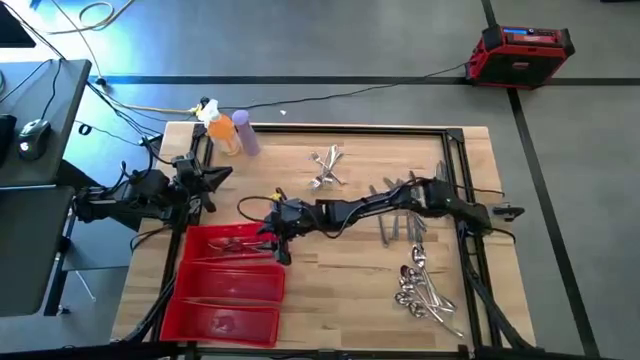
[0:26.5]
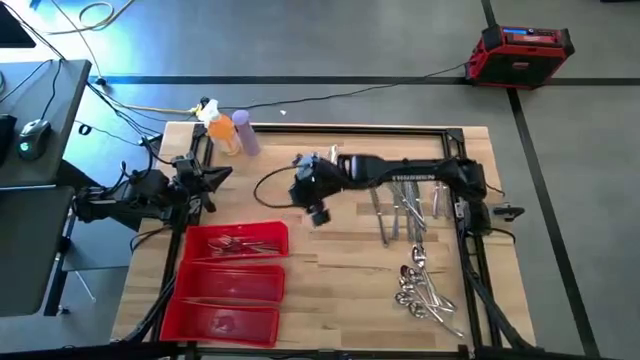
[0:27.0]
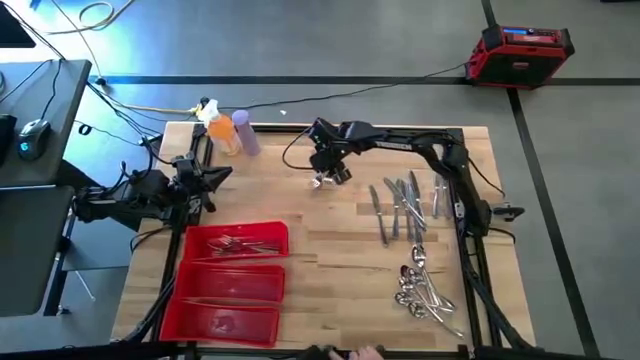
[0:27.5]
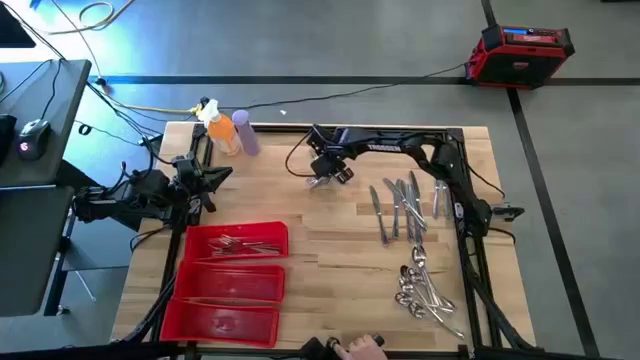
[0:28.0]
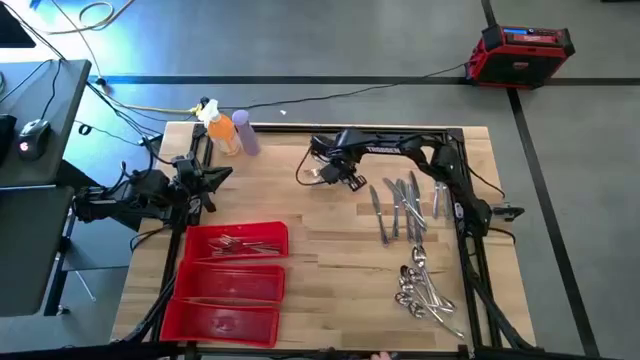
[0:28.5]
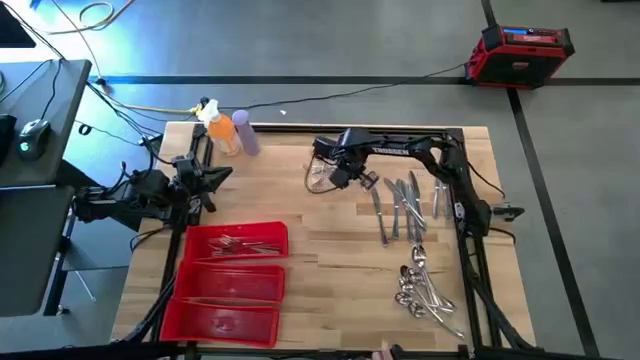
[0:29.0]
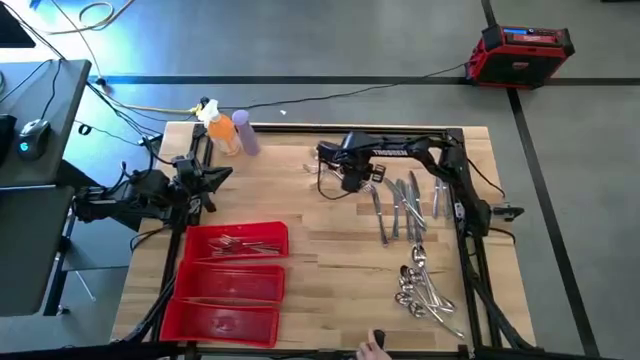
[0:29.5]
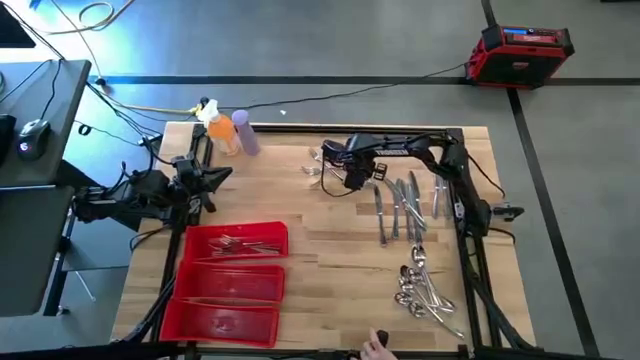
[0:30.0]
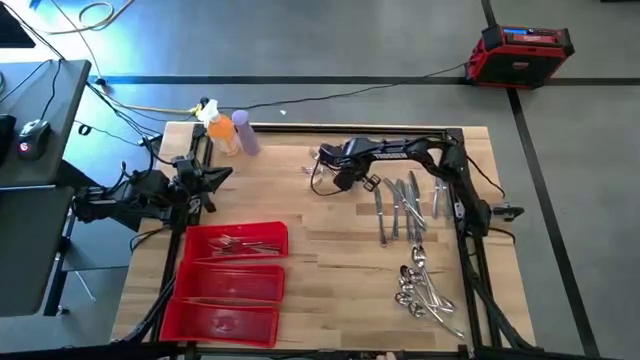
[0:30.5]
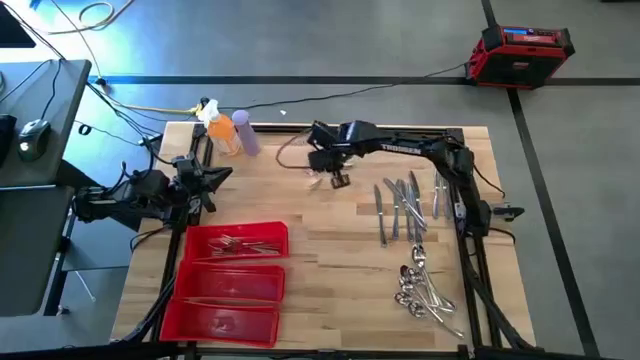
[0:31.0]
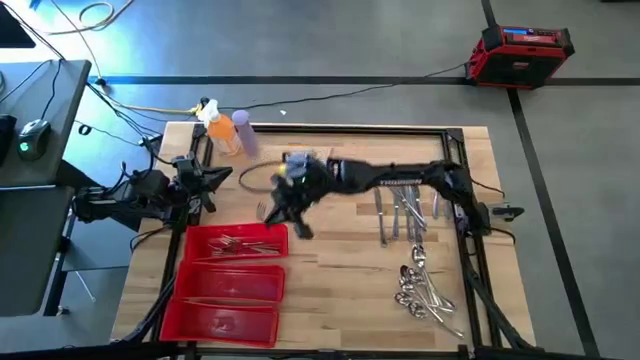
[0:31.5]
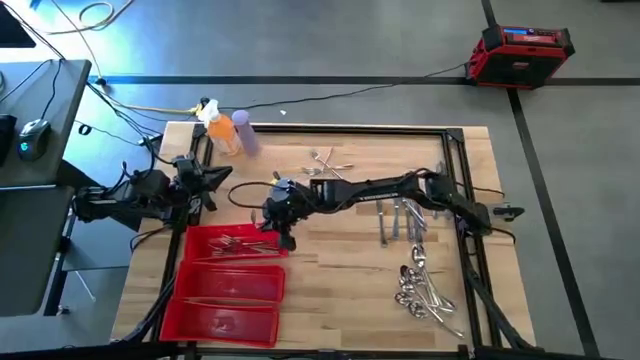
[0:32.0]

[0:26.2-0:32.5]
Task: Sort silverware
Put the silver fork in the top red bin

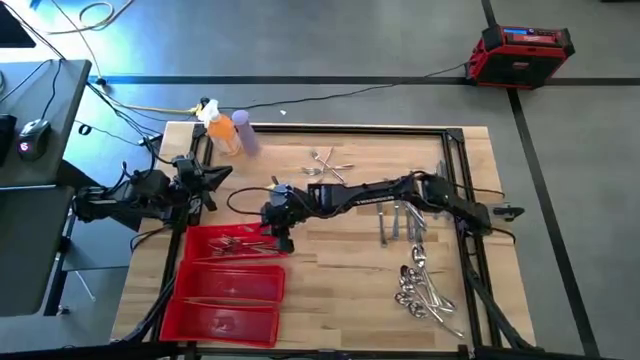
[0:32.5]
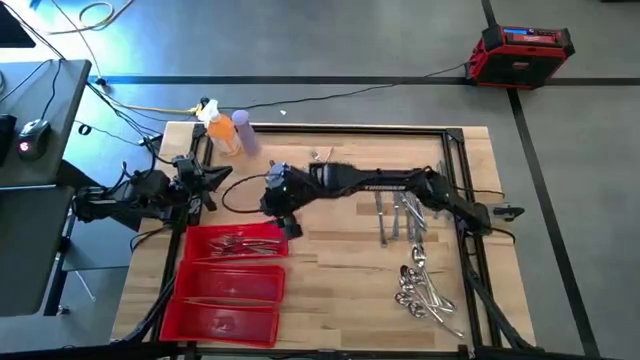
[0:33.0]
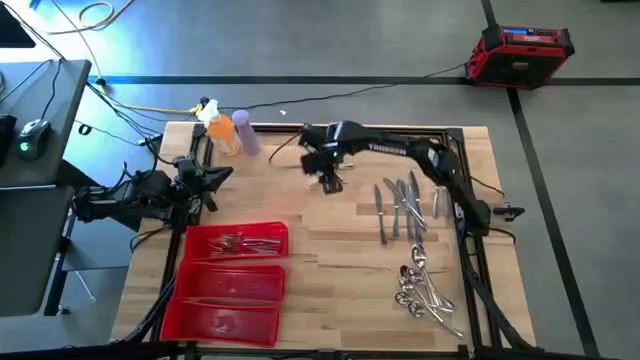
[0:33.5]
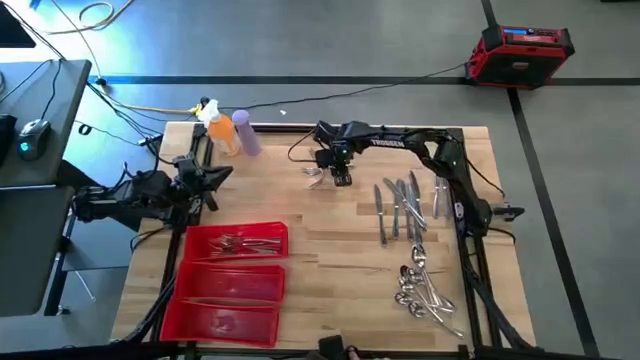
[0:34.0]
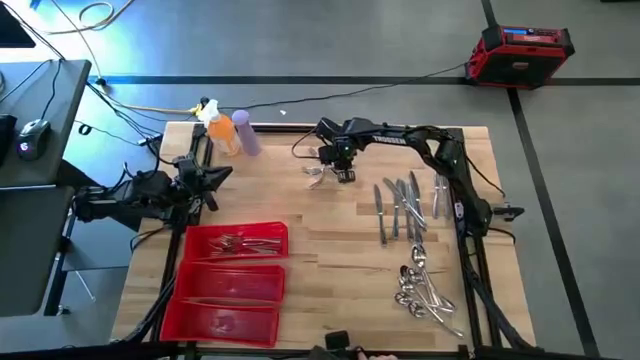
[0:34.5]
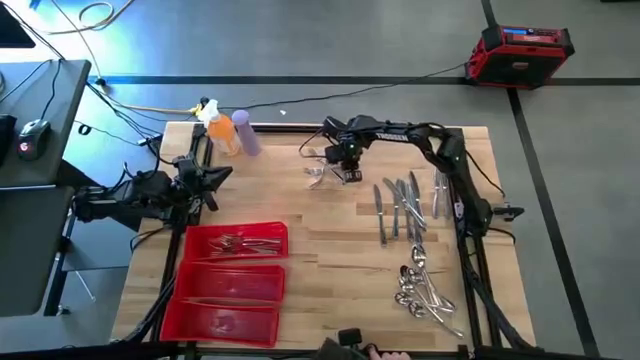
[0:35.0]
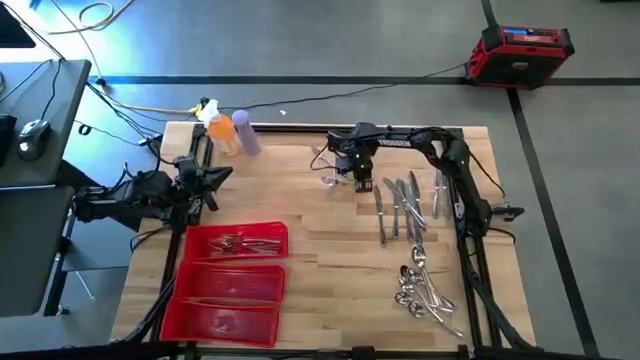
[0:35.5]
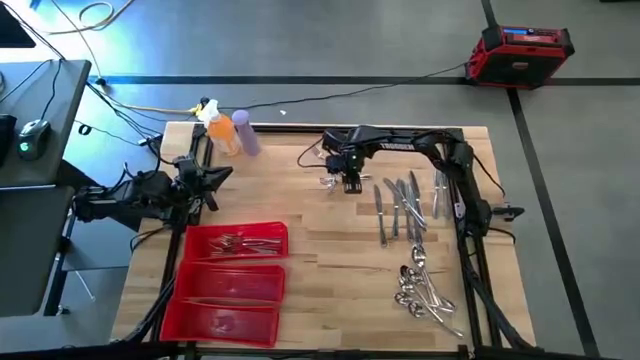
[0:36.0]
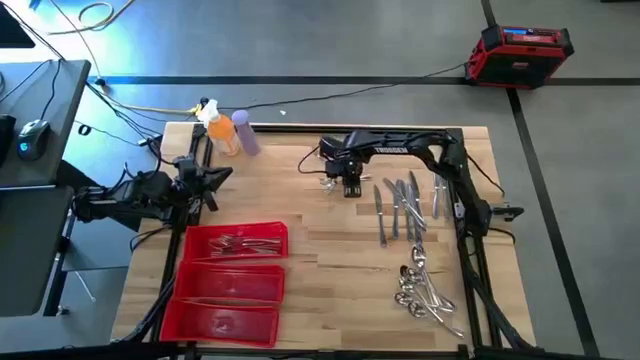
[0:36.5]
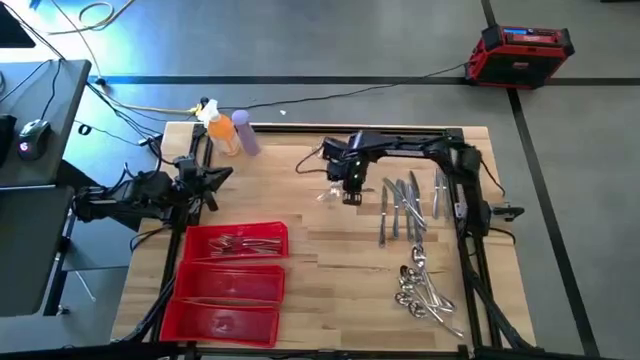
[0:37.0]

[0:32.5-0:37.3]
Put the silver fork in the top red bin

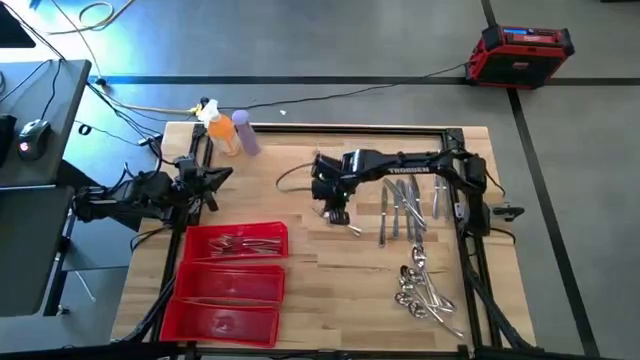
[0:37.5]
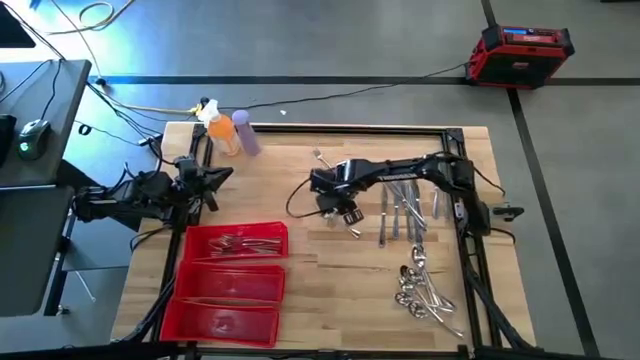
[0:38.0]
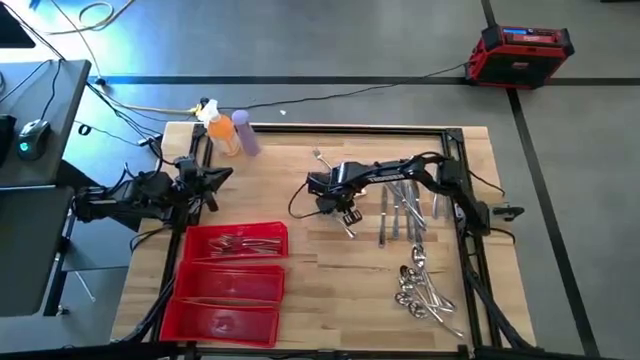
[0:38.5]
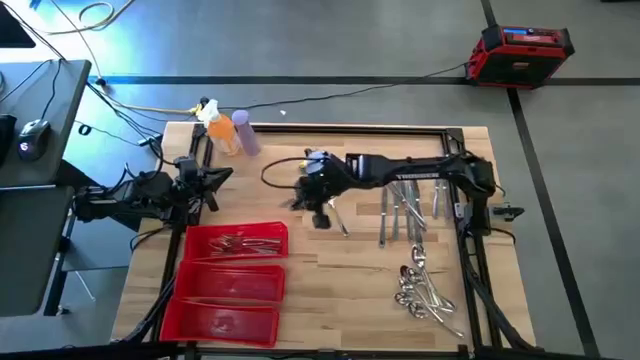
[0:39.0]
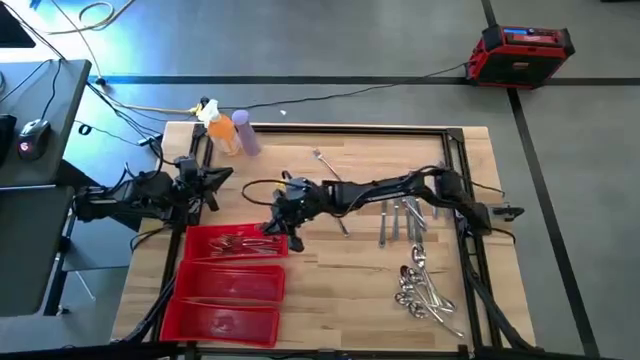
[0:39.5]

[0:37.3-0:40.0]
Put the silver fork in the top red bin

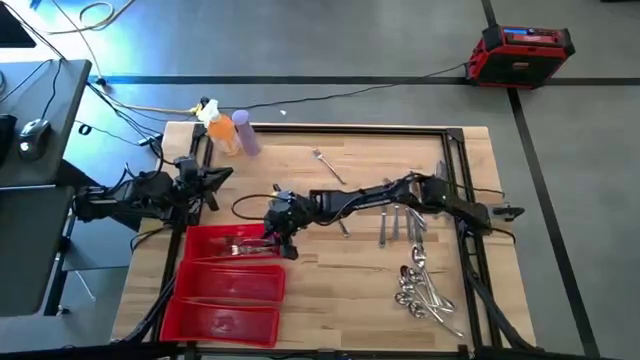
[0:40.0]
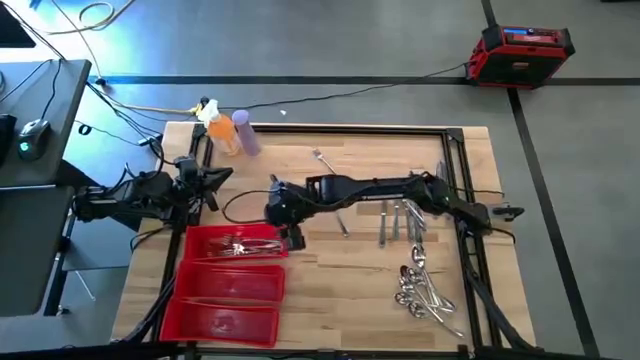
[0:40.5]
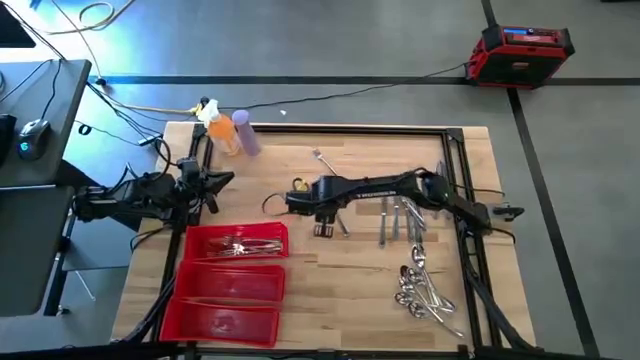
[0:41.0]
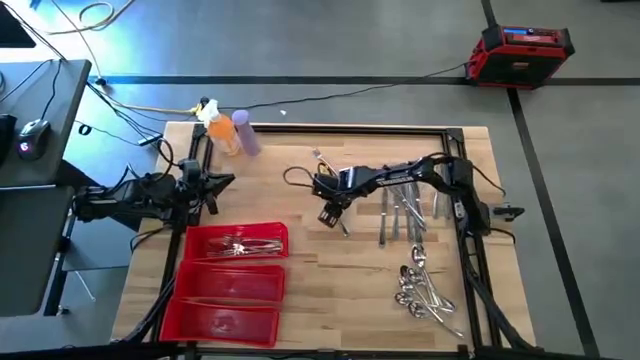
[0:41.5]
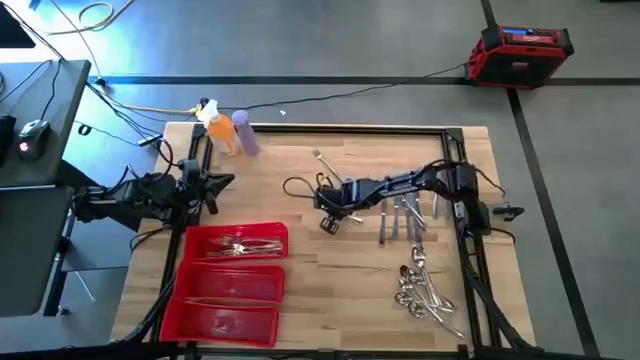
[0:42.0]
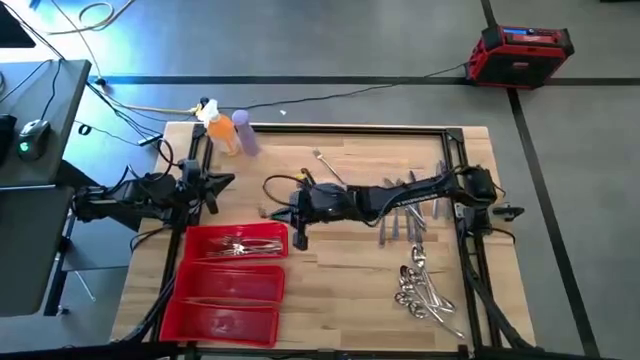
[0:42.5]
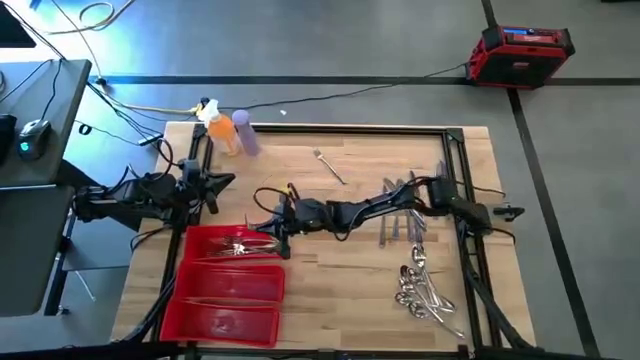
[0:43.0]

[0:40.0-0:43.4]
Put the silver fork in the top red bin

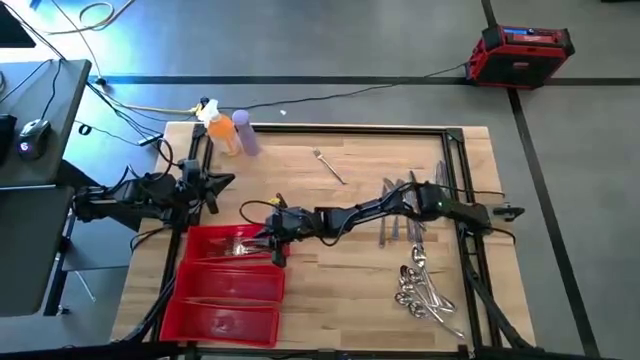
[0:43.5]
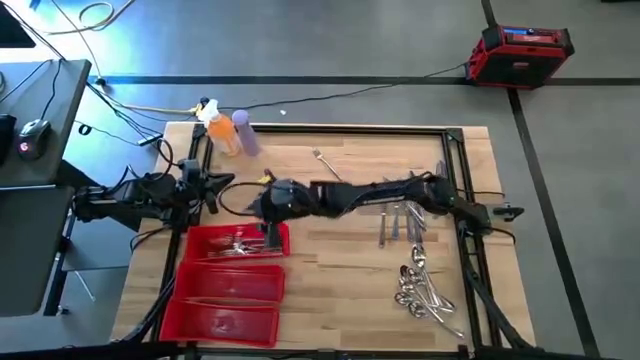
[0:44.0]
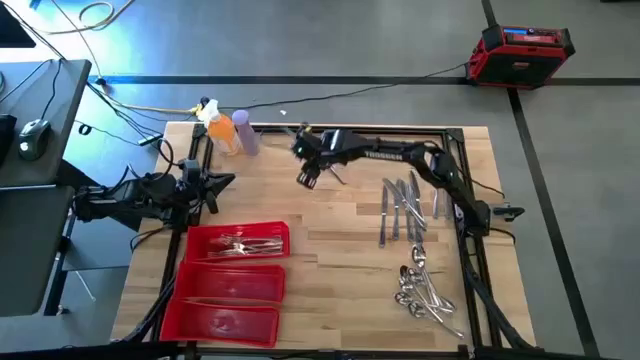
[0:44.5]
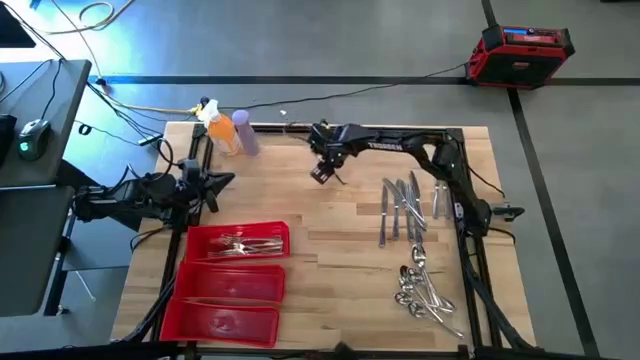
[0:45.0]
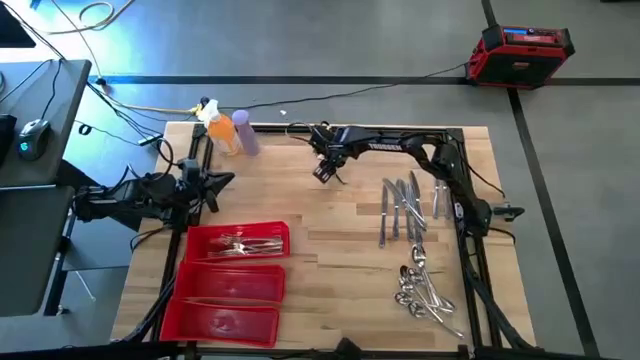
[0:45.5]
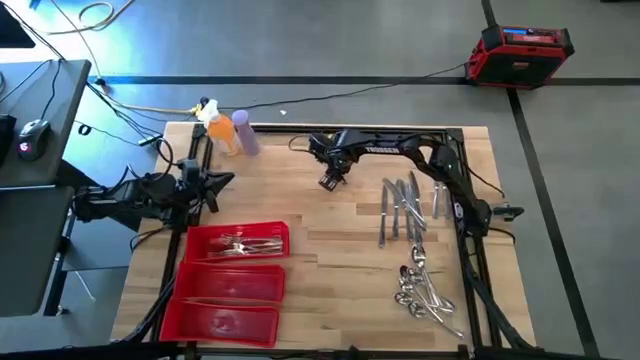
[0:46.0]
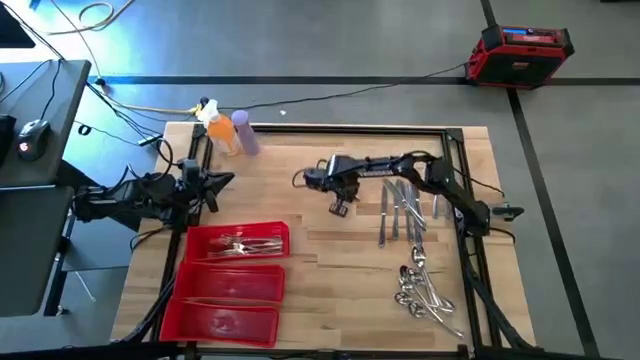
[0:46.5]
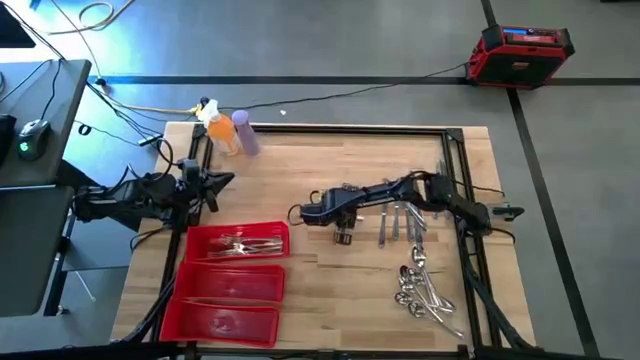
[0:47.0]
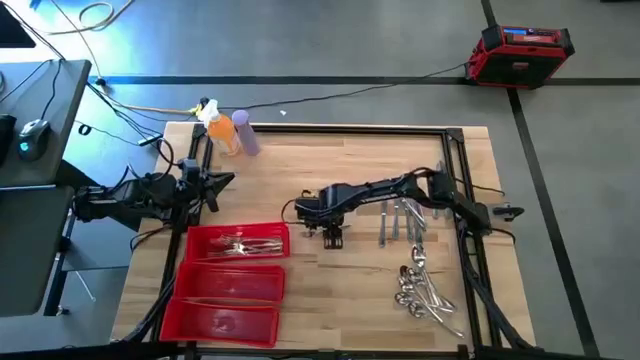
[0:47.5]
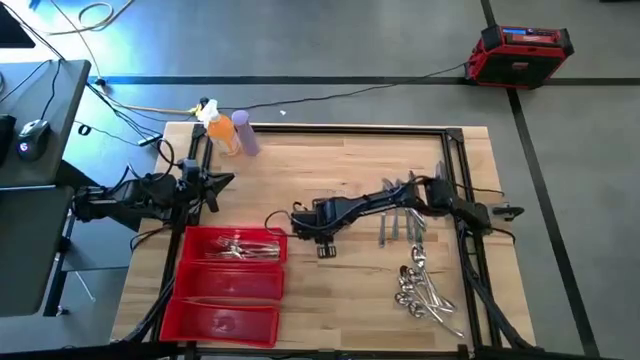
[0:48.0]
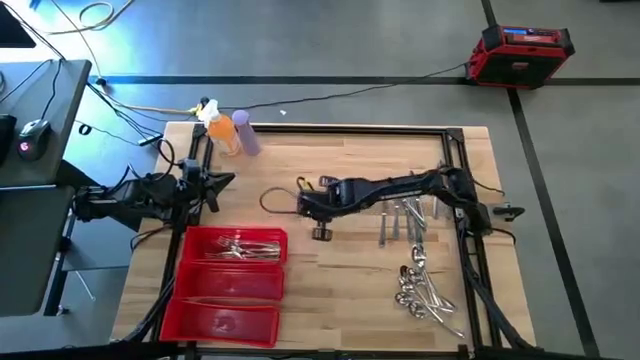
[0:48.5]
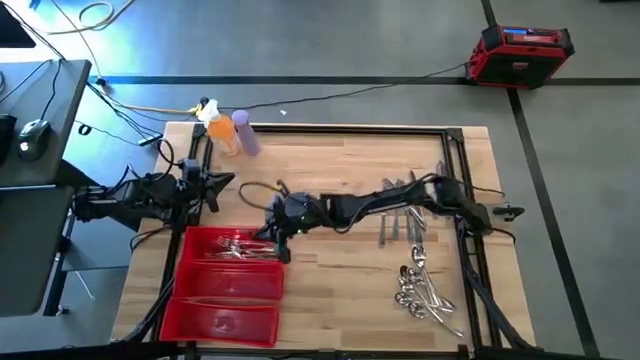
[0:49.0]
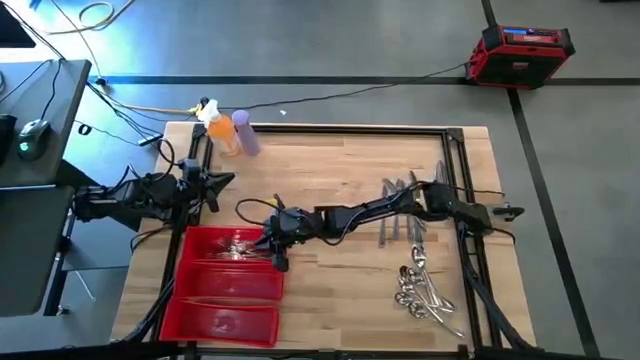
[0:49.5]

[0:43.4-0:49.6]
Put the silver fork in the top red bin
